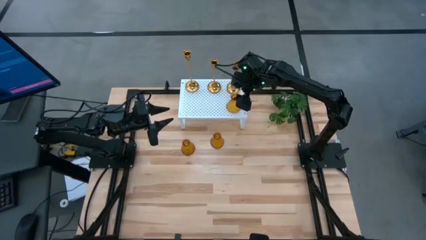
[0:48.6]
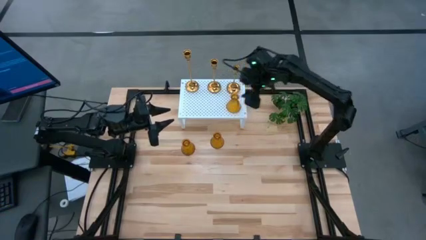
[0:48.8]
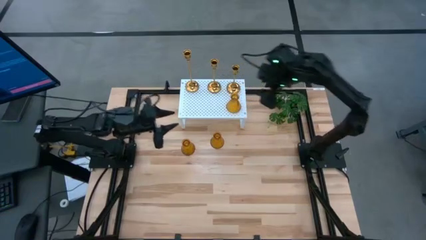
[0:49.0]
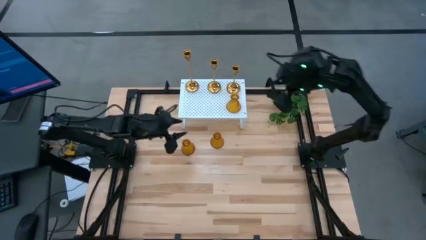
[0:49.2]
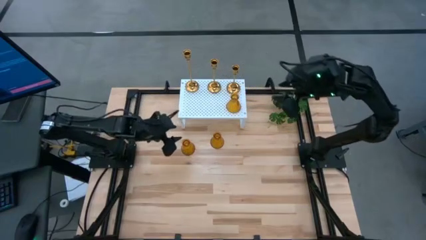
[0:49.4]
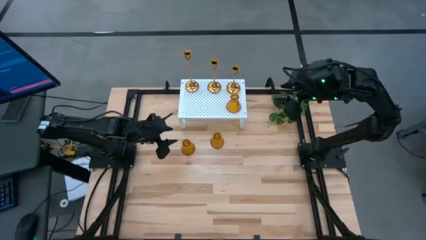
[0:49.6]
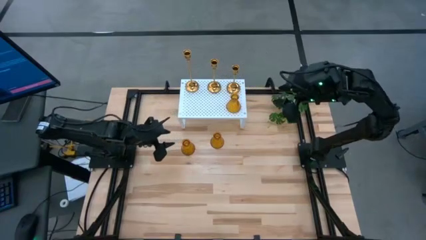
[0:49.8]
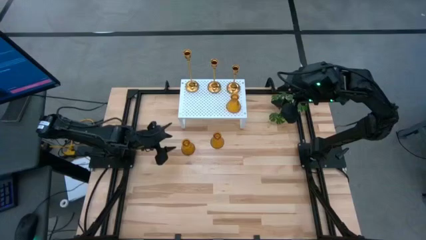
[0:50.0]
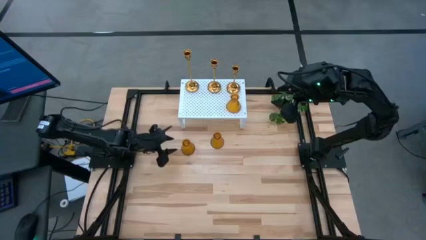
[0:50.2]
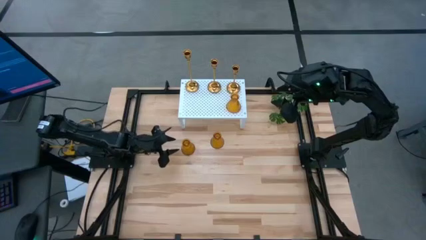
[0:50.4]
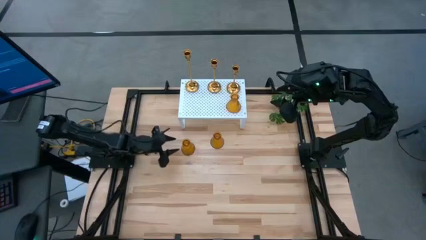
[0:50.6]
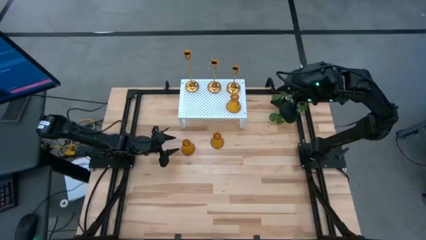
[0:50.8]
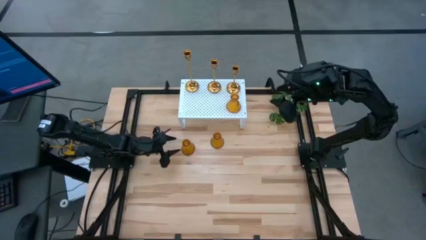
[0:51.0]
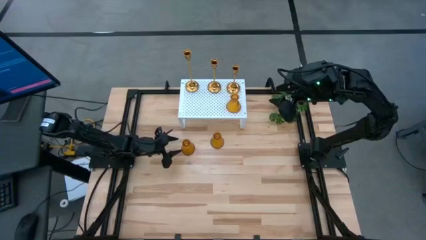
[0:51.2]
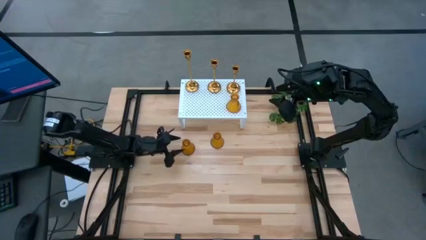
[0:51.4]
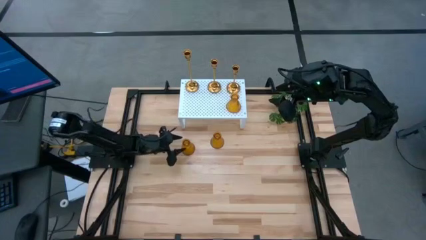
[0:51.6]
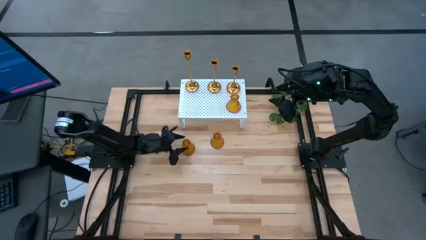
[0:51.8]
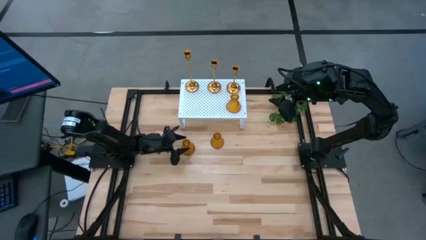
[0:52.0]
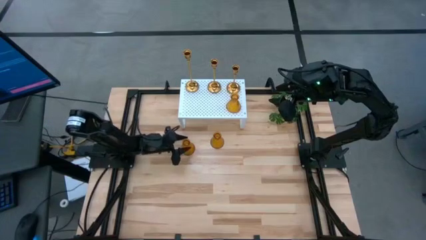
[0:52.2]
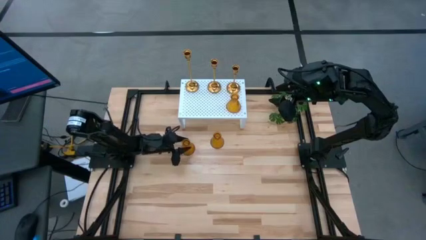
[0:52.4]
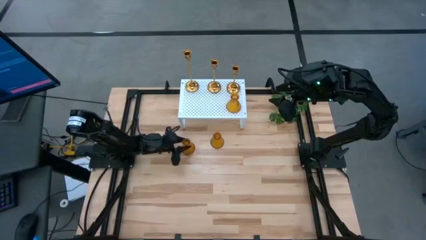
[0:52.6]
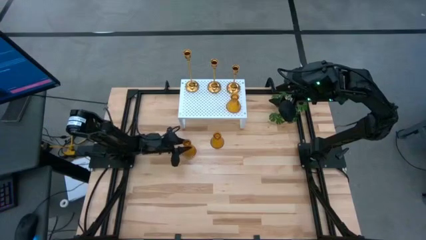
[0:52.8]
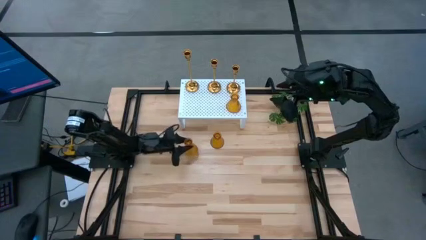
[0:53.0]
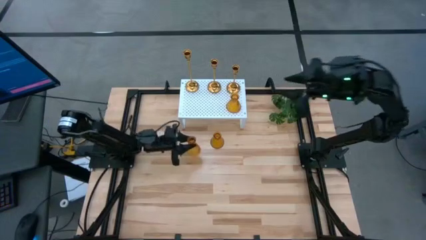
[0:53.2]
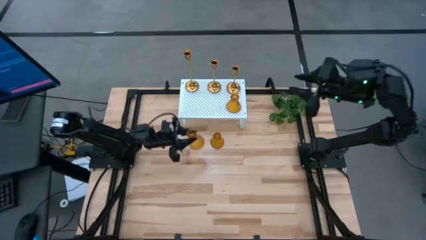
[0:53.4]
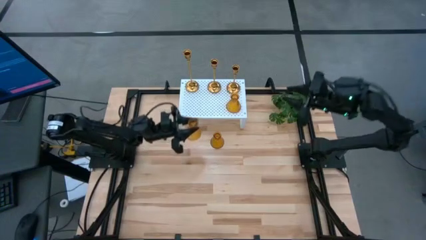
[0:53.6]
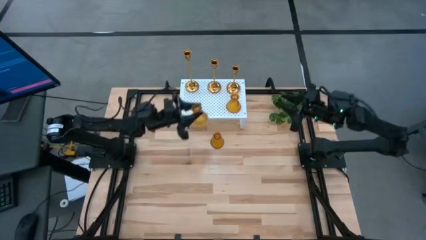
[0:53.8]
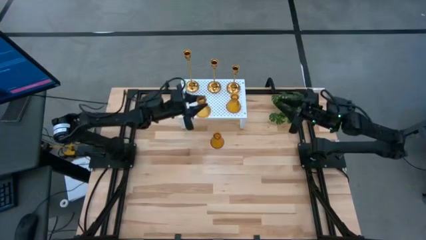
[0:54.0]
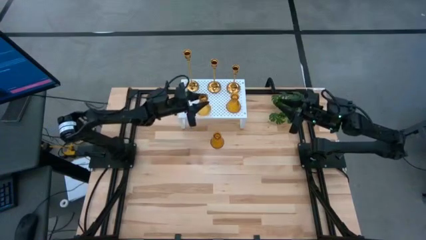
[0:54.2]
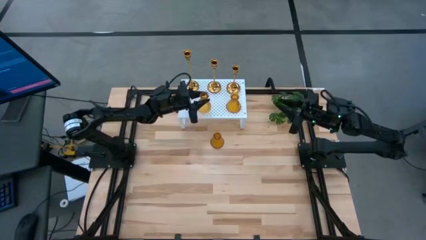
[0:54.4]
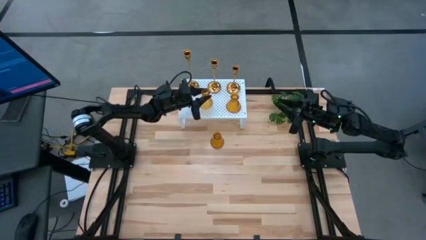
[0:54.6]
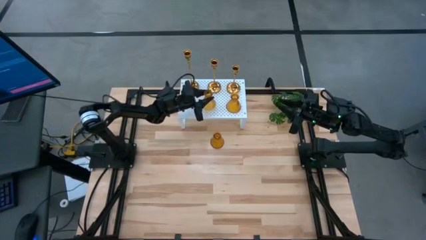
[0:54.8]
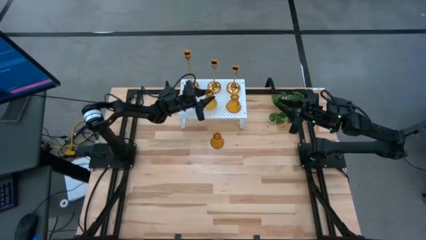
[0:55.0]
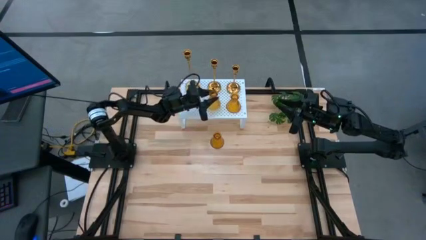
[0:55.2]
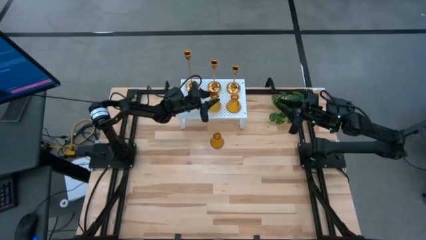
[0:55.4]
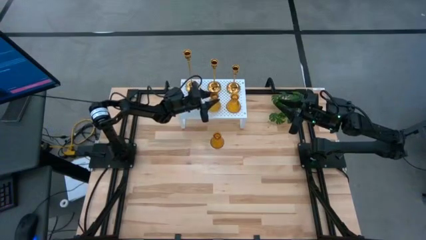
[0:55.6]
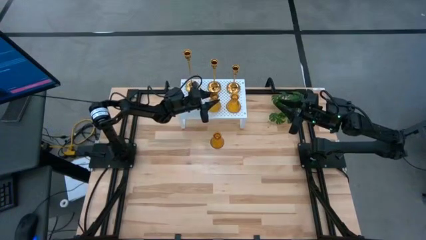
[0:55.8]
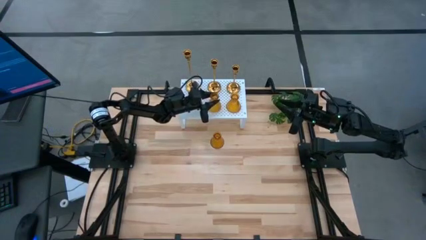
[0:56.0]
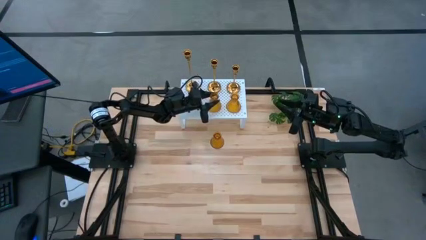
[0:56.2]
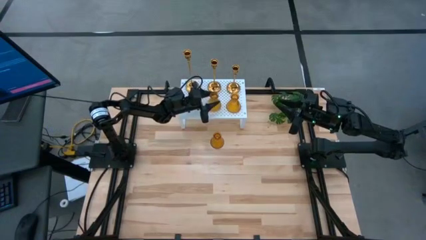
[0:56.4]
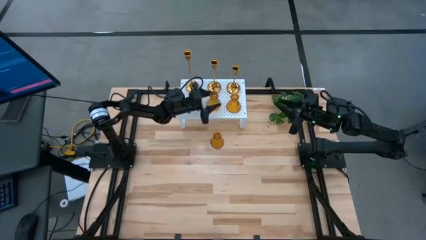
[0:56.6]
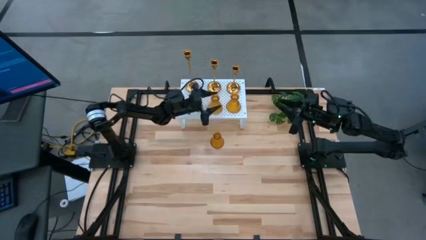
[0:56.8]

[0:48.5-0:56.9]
Task: Pick & Place candle stick holders
Put the left yellow glass candle holder on the shelf aligned with the other yellow glass candle holder

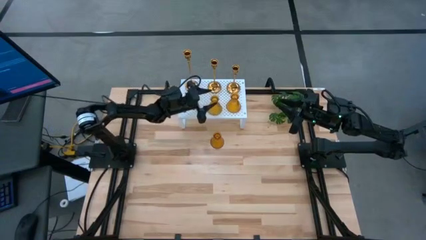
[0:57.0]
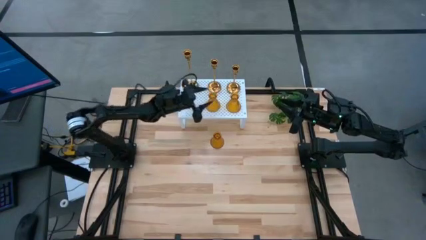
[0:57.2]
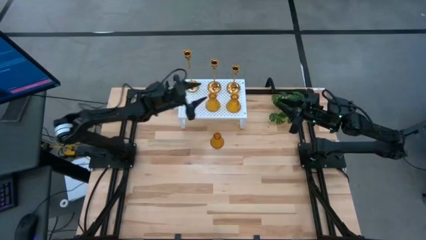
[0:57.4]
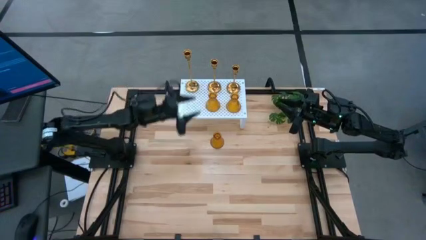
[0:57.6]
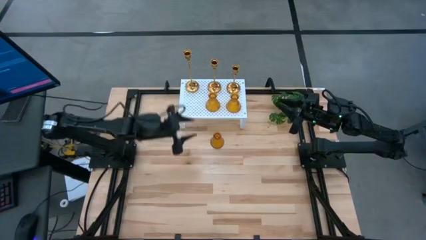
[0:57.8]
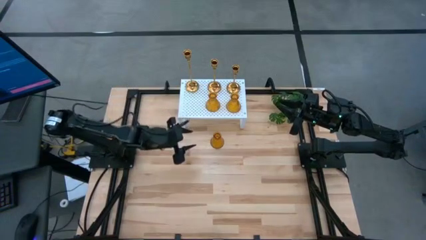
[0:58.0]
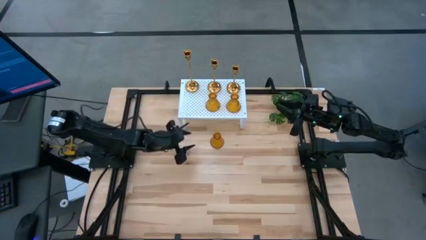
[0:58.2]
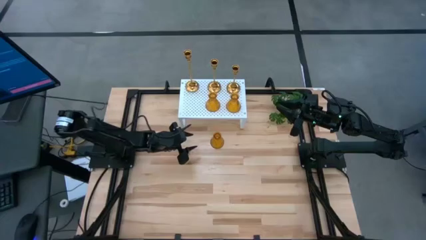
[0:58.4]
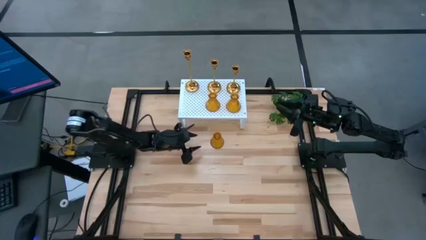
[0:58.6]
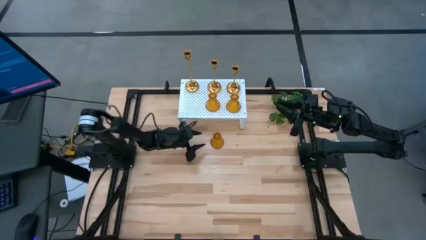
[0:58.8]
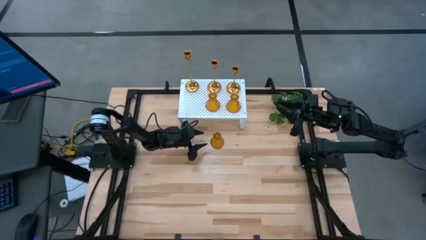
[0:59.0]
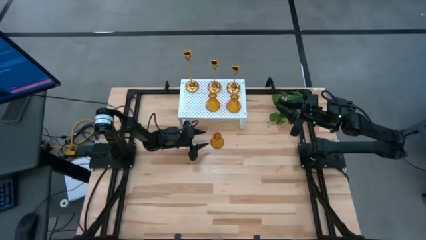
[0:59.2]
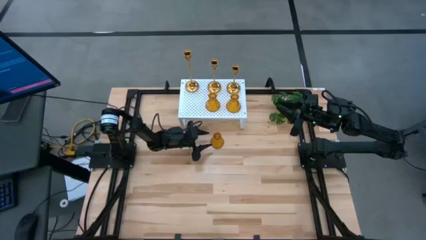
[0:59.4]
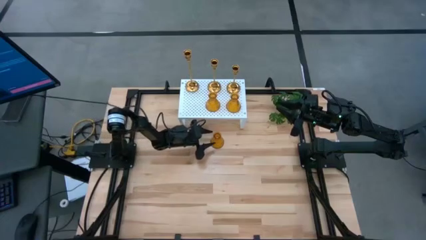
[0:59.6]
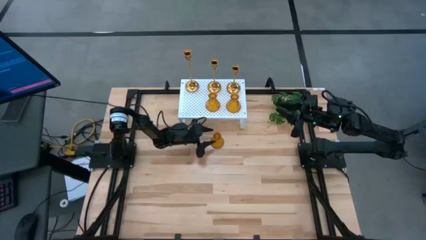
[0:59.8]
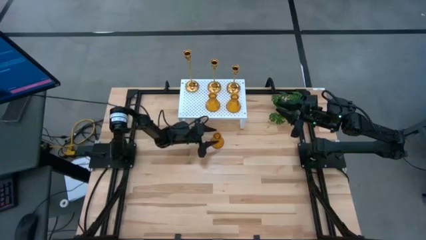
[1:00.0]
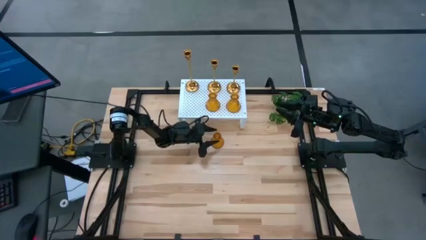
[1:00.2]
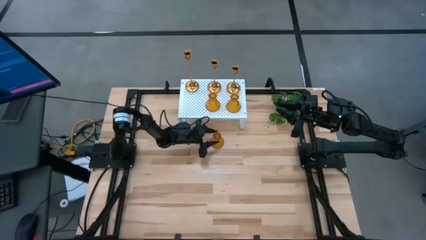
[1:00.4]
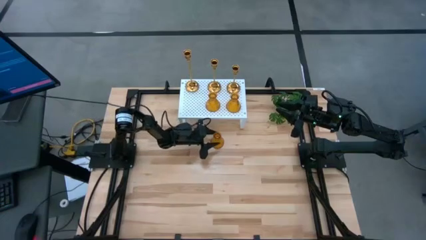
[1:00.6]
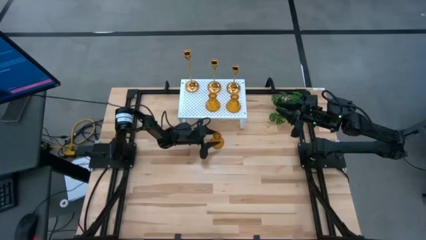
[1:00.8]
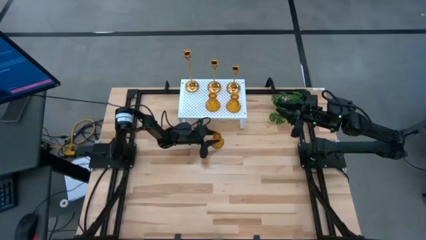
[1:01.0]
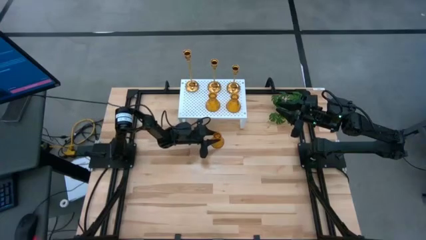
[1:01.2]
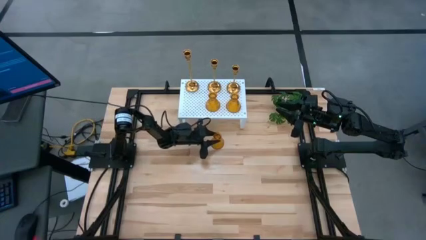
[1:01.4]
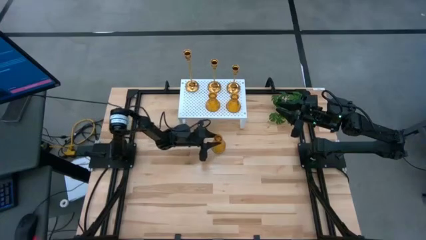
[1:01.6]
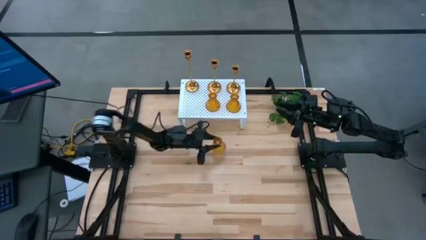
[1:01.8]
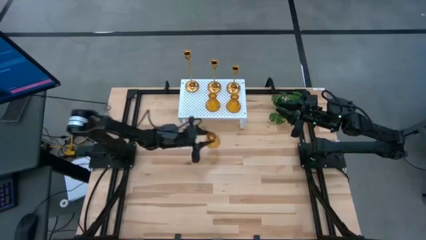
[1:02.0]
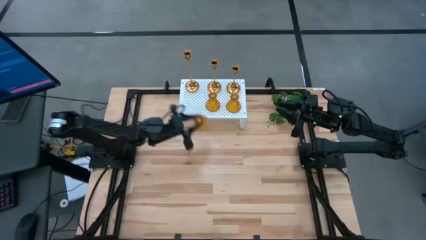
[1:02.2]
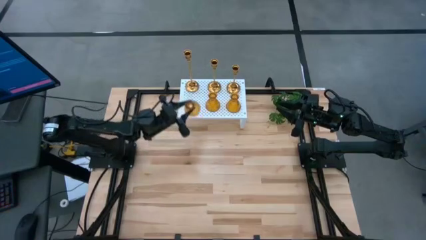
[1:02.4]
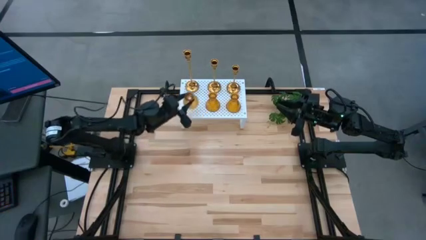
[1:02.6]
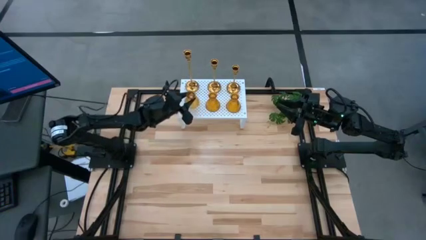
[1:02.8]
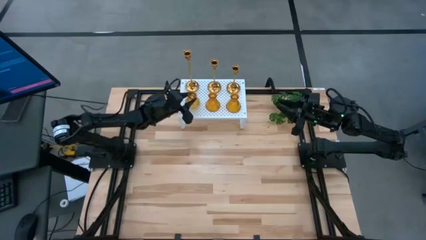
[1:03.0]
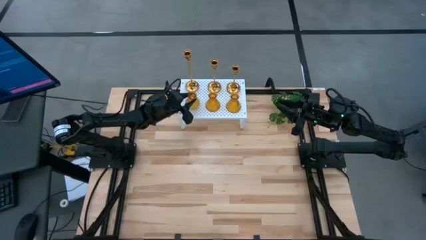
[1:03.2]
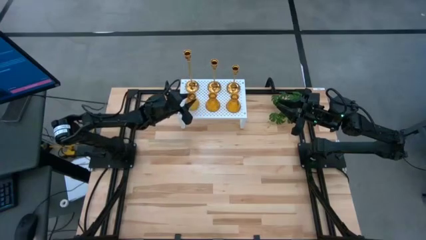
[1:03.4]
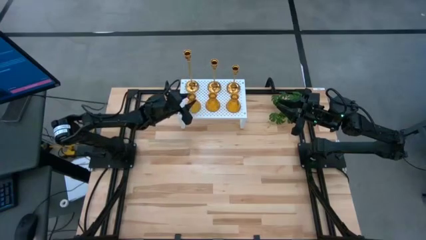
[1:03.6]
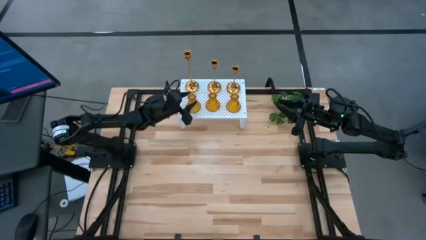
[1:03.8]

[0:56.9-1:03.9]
Put the yellow glass candle holder on the shelf aligned with the other yellow glass candle holder

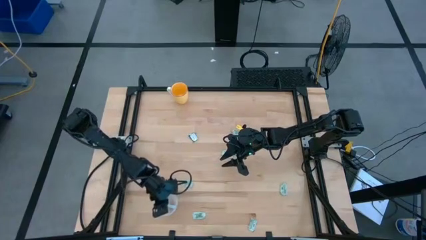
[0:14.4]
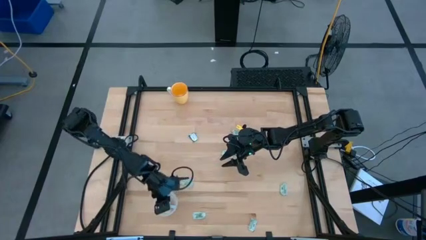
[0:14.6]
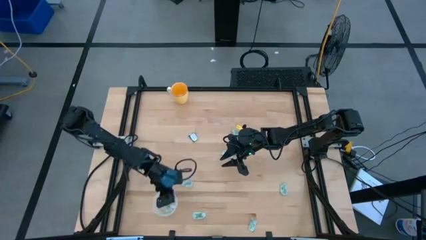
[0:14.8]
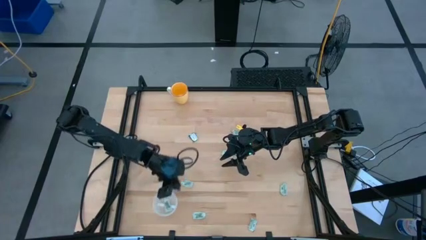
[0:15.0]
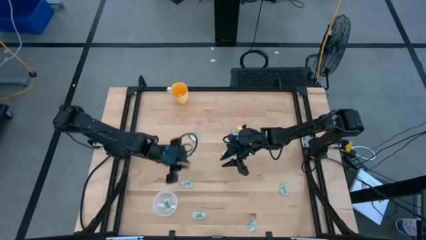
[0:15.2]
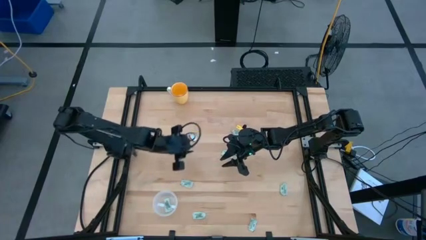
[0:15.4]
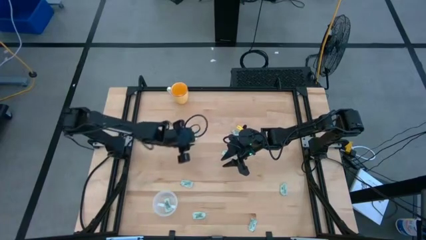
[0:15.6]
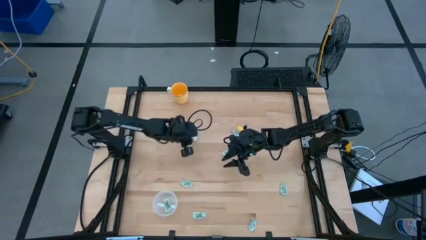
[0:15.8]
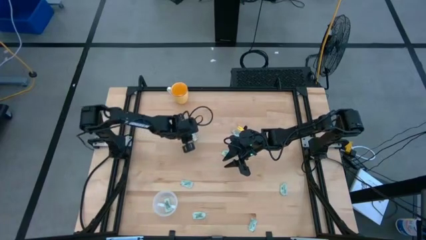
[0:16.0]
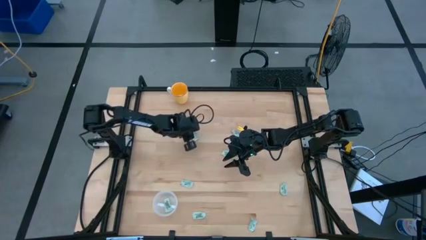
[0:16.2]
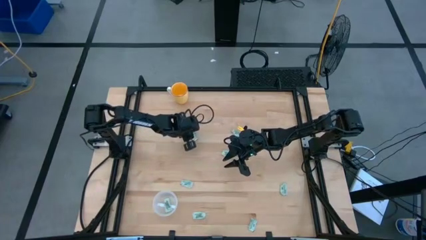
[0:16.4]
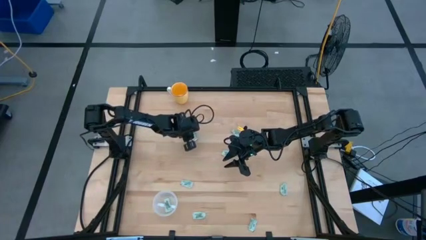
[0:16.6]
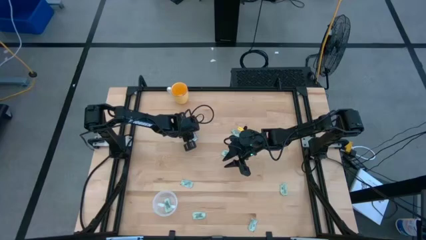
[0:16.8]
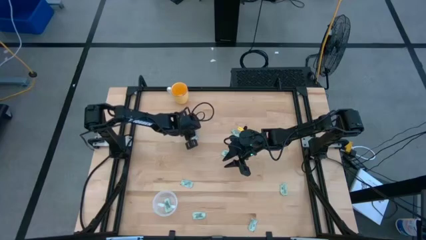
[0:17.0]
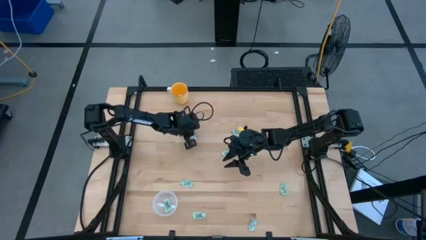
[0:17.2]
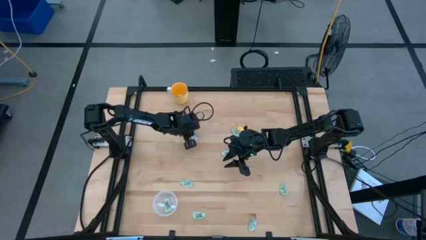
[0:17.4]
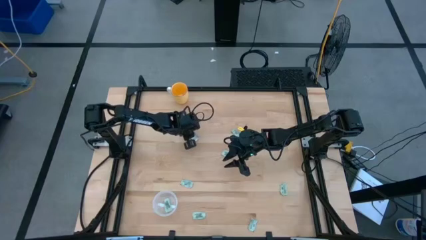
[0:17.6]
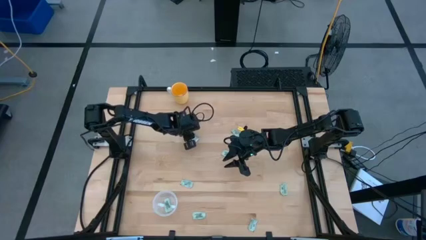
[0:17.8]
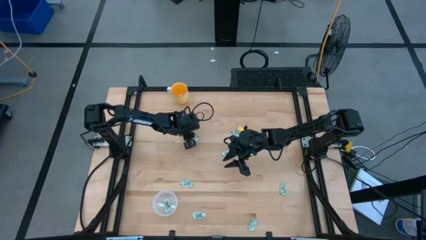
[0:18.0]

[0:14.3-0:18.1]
Task: Pick and place Stevia / Truvia into bins
Put the stevia packet into the transparent container
